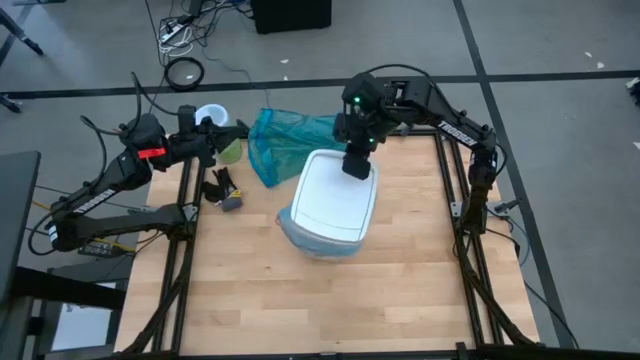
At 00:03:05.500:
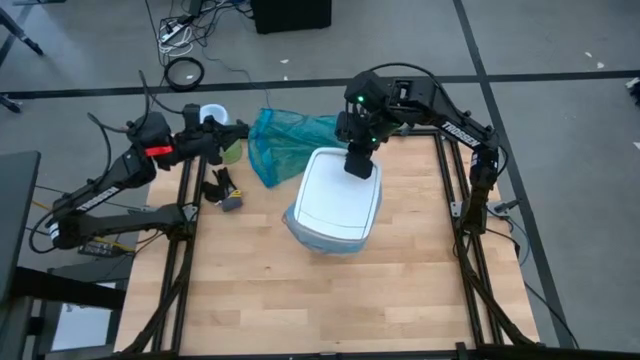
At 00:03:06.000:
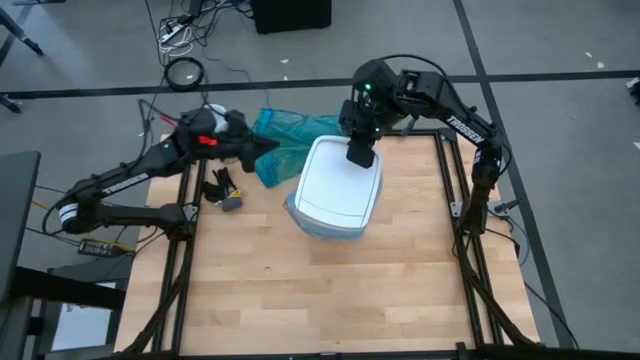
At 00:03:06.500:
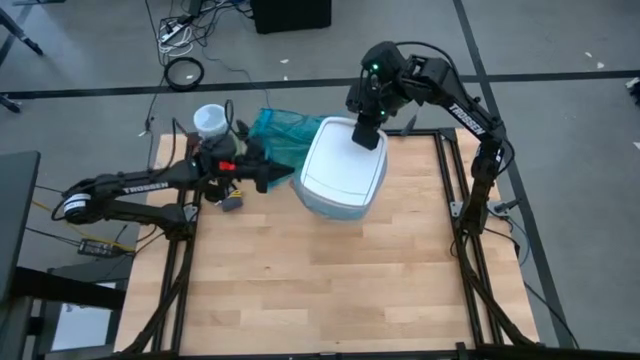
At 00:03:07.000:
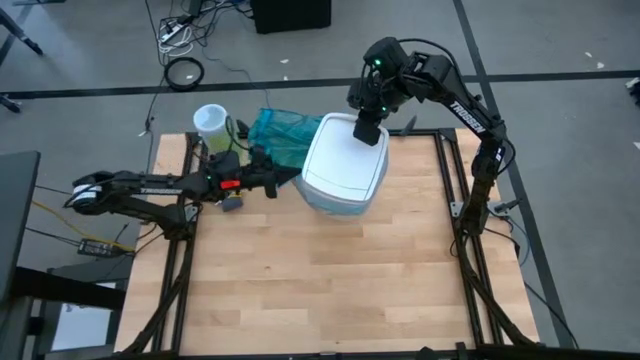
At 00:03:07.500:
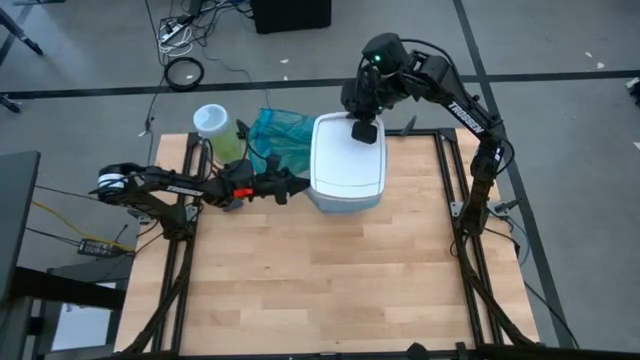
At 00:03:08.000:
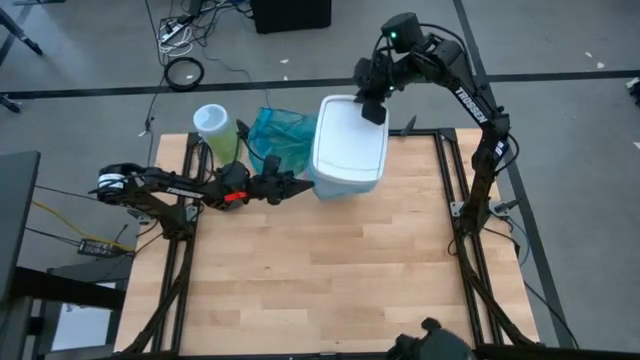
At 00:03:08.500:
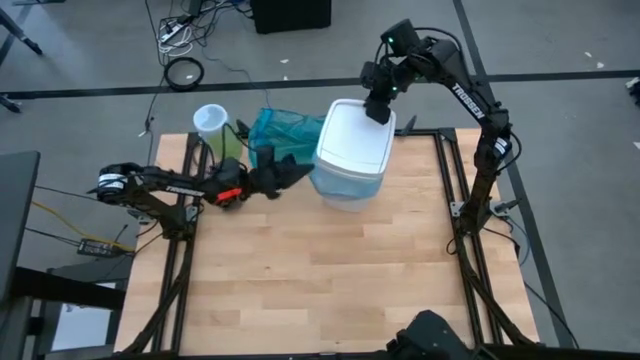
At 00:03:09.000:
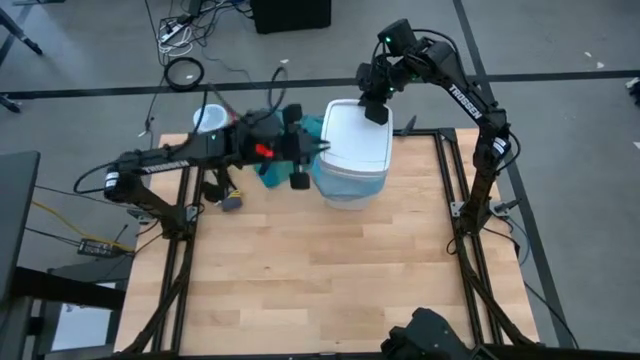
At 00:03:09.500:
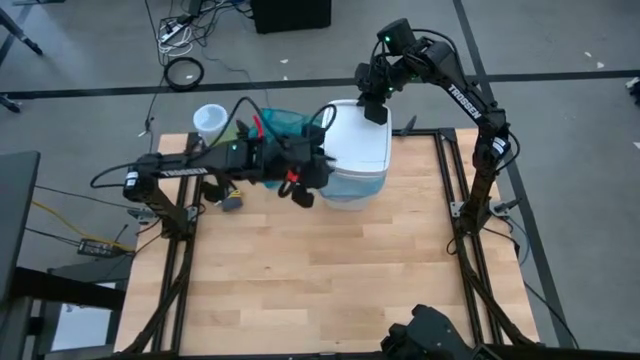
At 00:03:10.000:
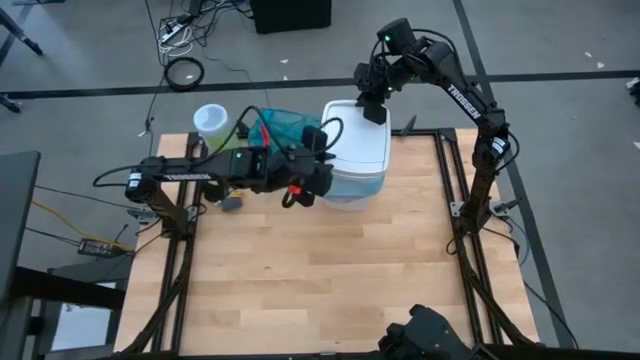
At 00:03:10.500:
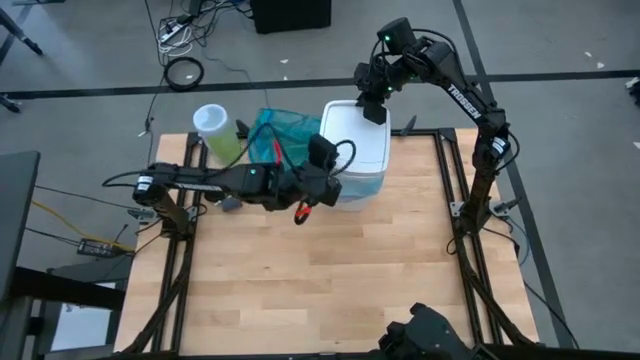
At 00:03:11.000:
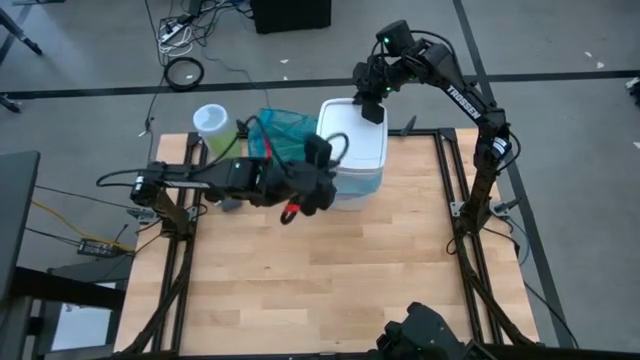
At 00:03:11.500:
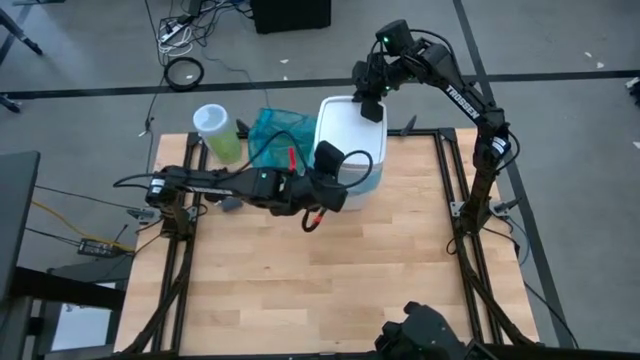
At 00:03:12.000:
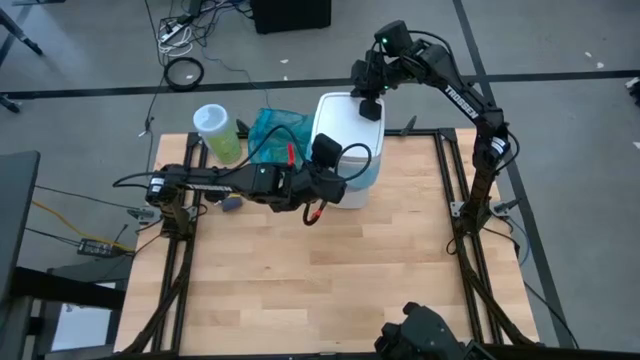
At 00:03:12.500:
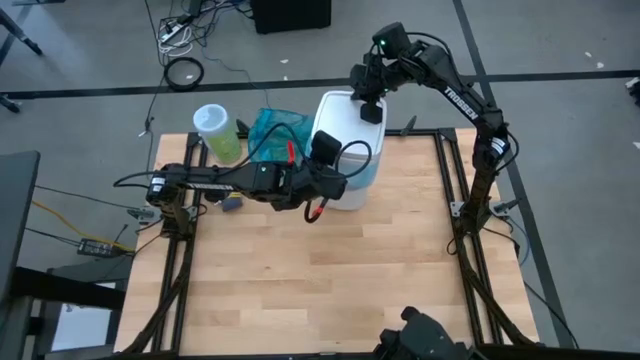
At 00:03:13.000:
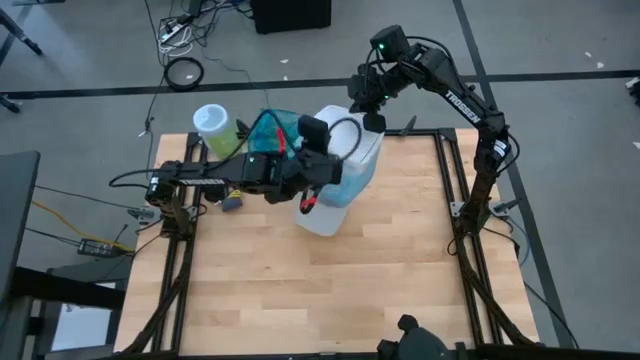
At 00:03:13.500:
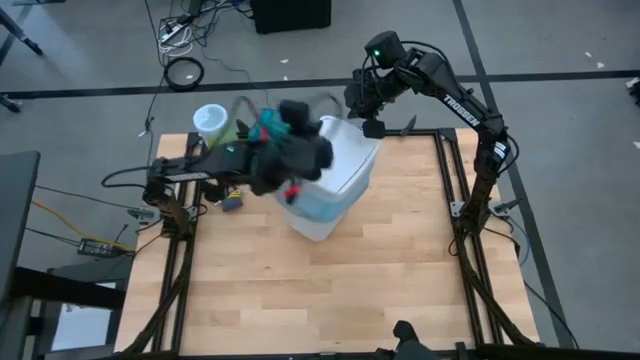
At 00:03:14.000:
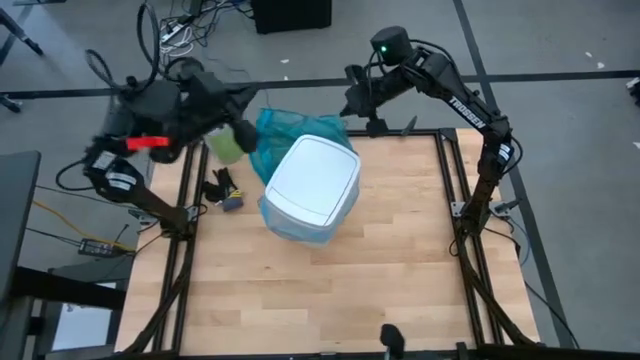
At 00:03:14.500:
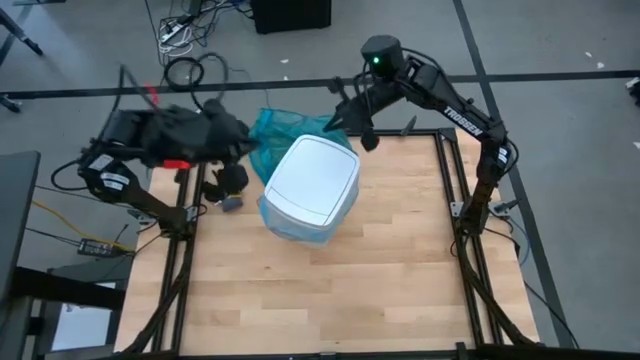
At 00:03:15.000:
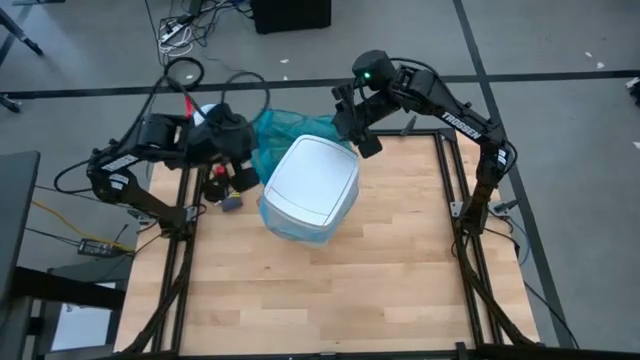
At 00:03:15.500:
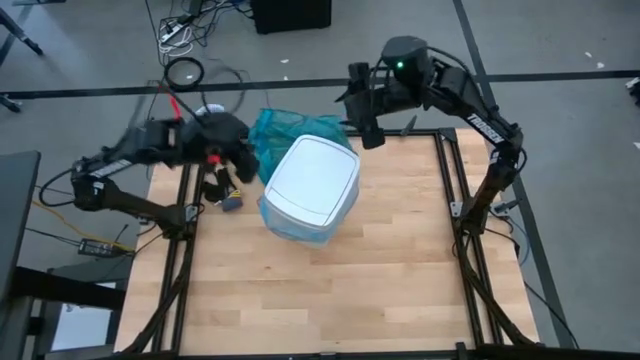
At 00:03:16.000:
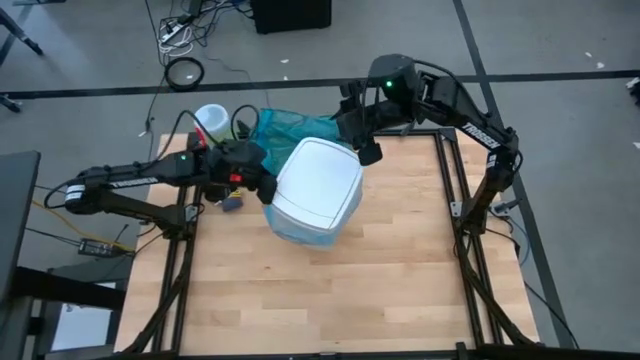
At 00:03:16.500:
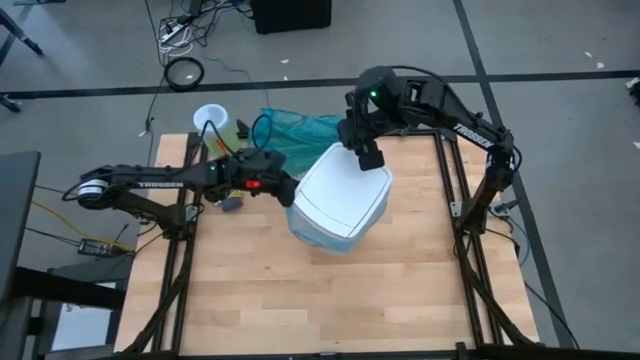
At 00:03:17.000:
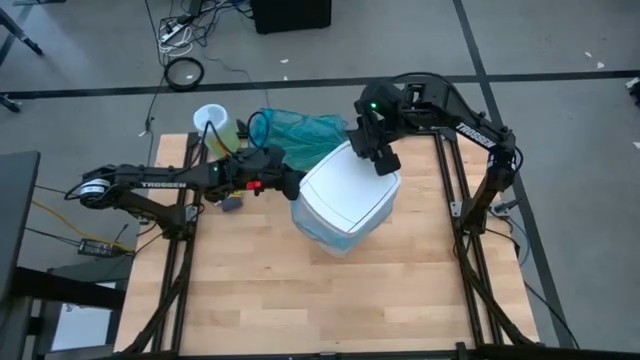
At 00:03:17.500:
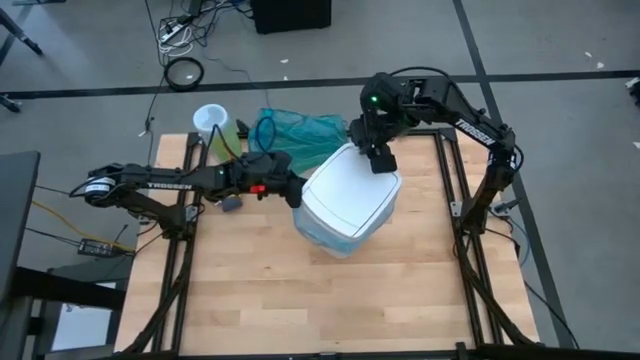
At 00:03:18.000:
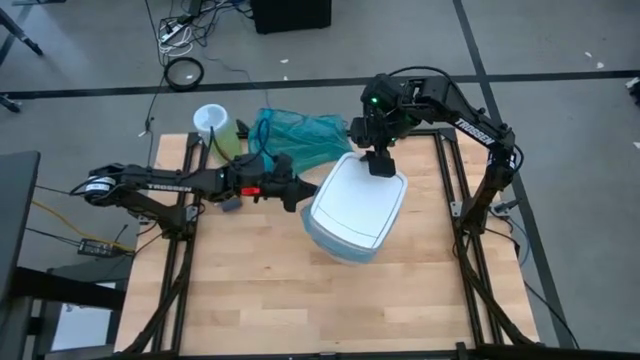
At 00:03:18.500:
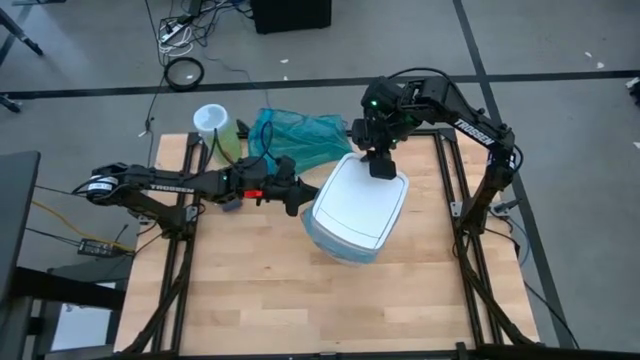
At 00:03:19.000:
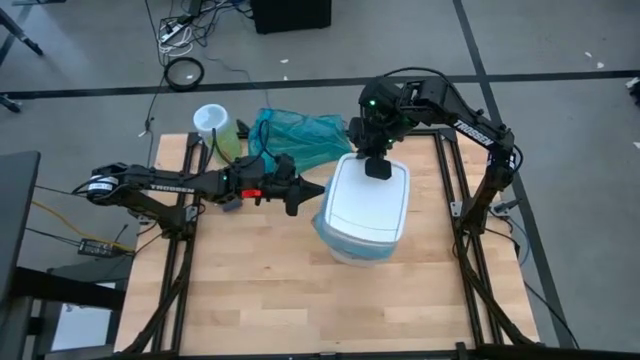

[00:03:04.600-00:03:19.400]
Task: place trash/remove bag and relplace
Remove the white trash lid from the white trash bin

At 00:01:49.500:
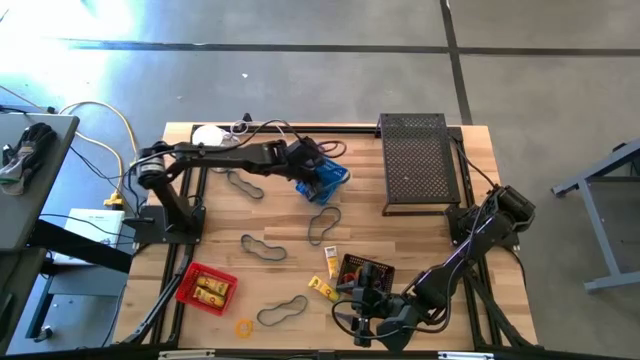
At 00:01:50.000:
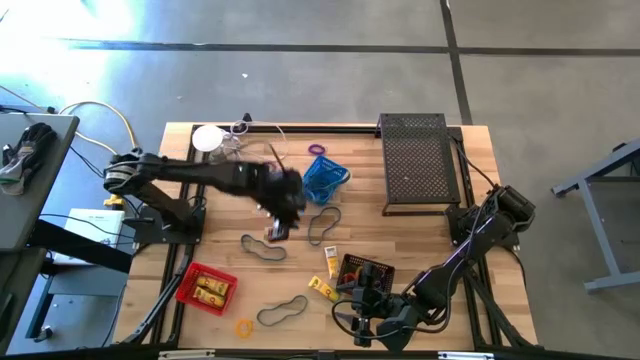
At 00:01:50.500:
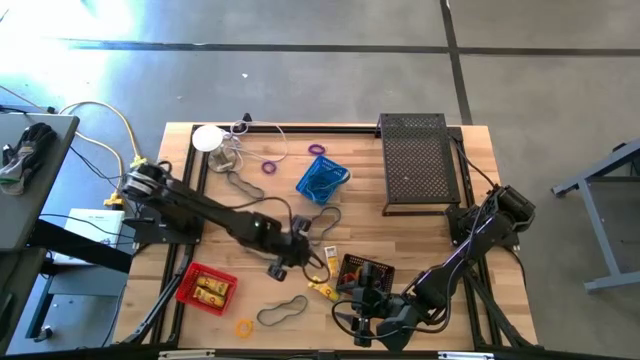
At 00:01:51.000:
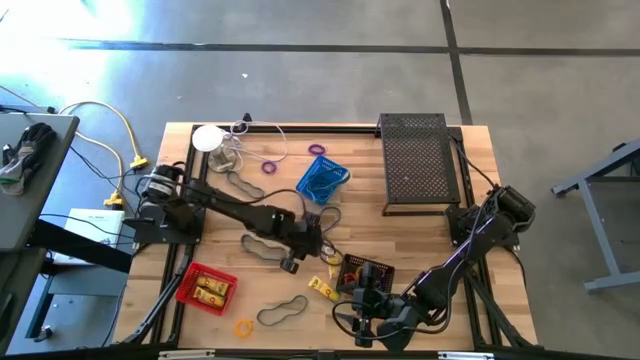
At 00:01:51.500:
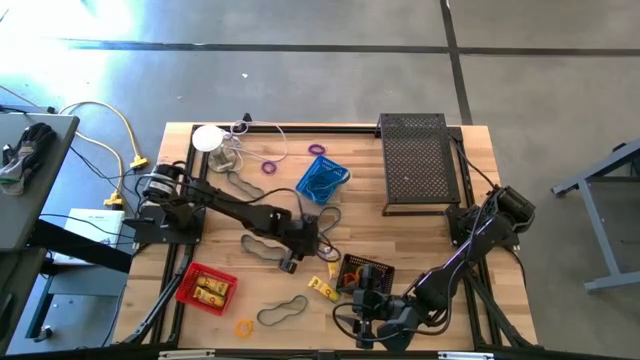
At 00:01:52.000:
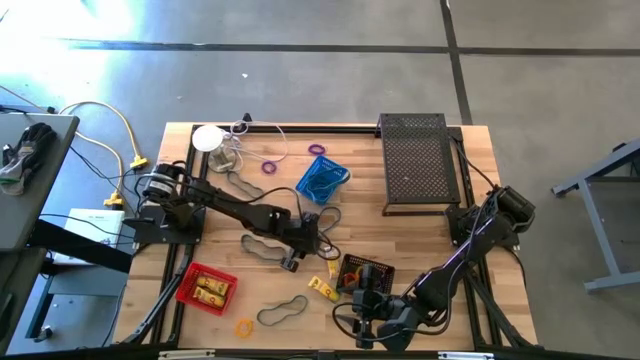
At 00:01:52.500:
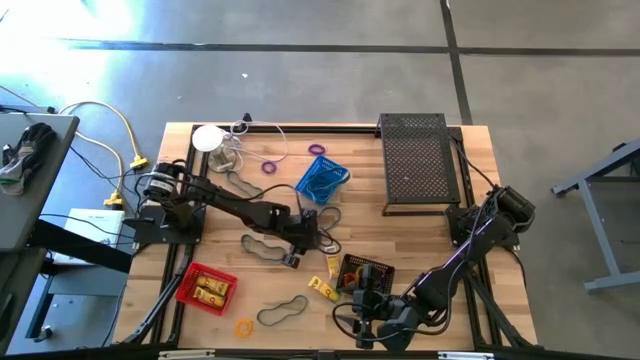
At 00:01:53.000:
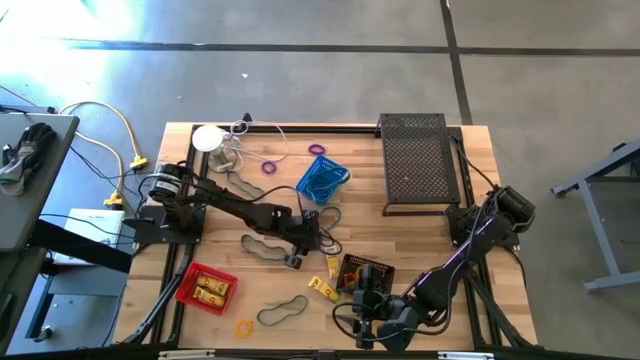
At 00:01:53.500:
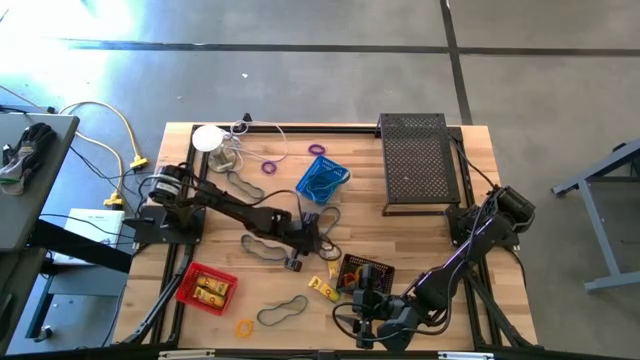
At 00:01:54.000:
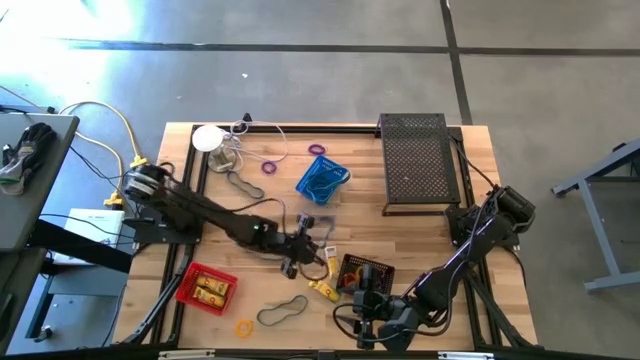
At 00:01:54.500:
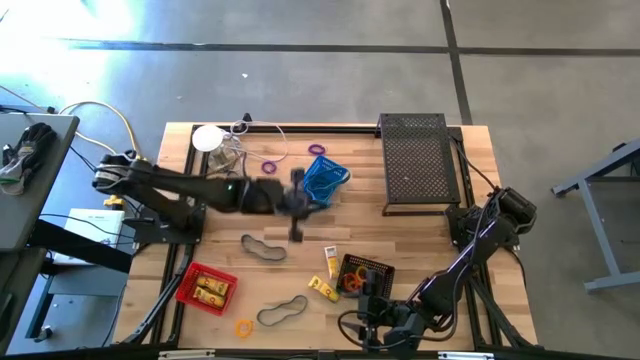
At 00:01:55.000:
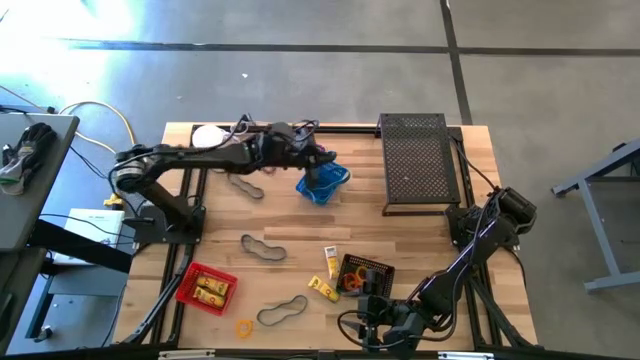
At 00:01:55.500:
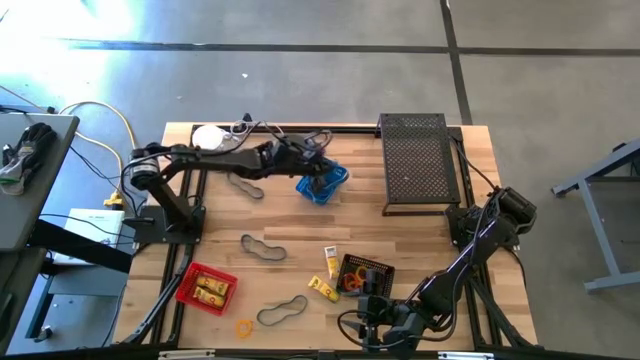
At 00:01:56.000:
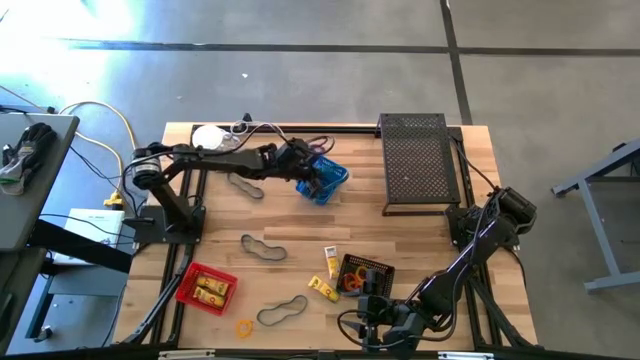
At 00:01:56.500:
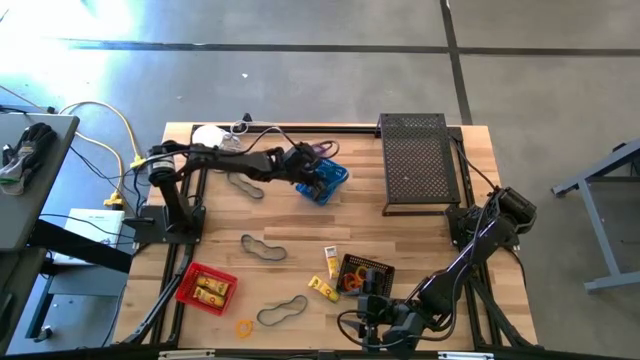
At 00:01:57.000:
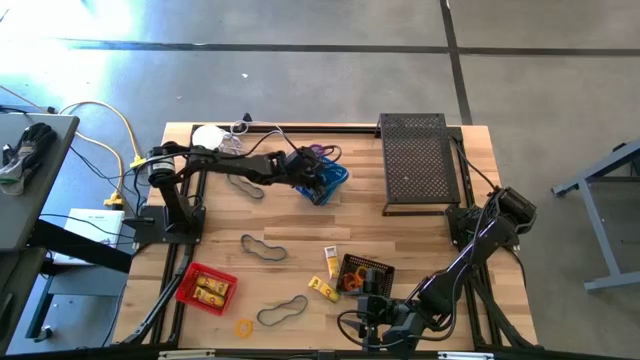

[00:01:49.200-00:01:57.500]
Task: Pick & Place Office Desk Supplies
Put the blue rubber band into the blue bin
